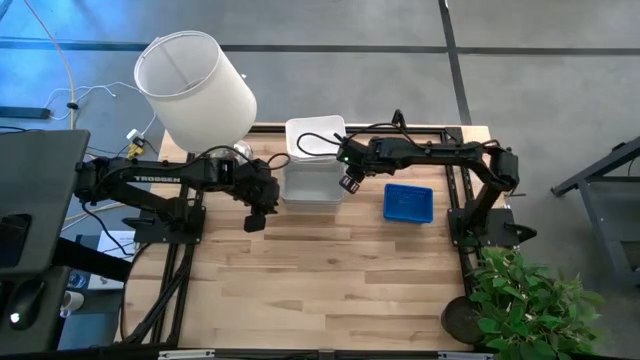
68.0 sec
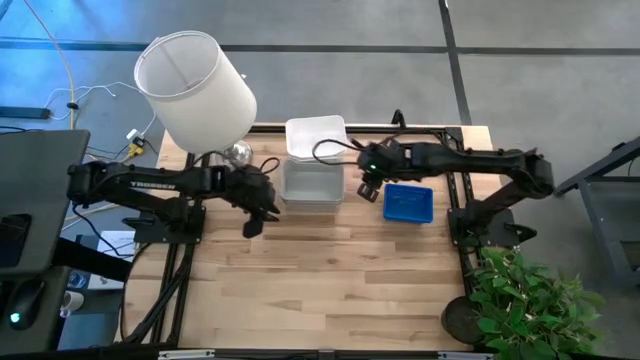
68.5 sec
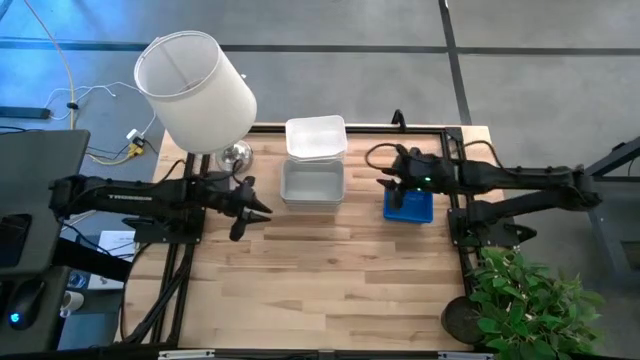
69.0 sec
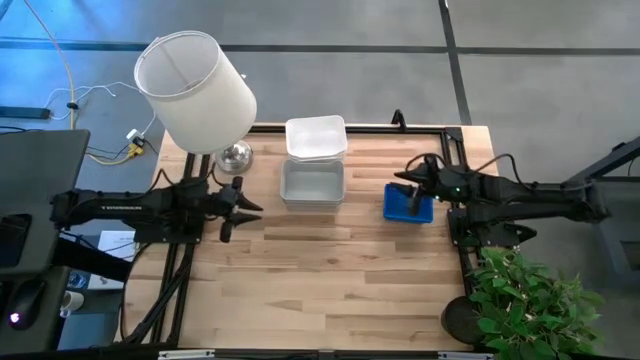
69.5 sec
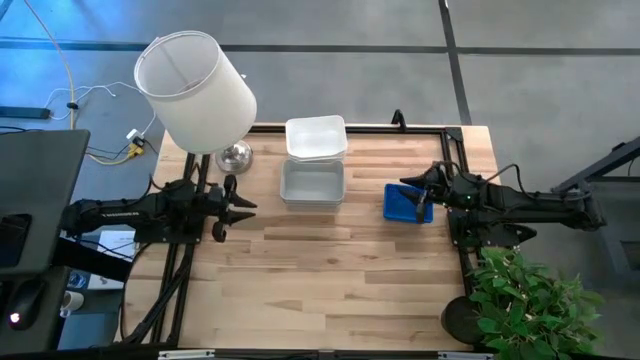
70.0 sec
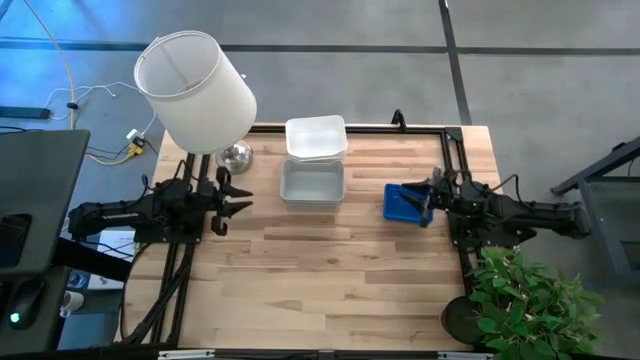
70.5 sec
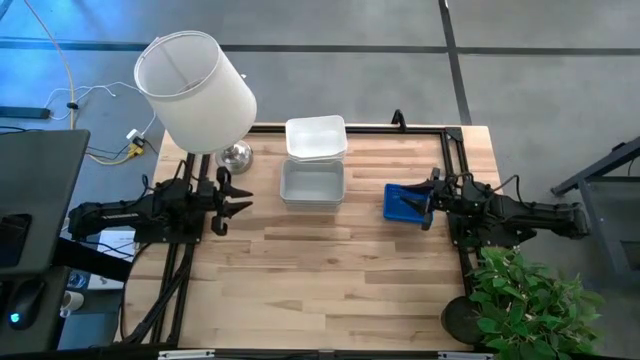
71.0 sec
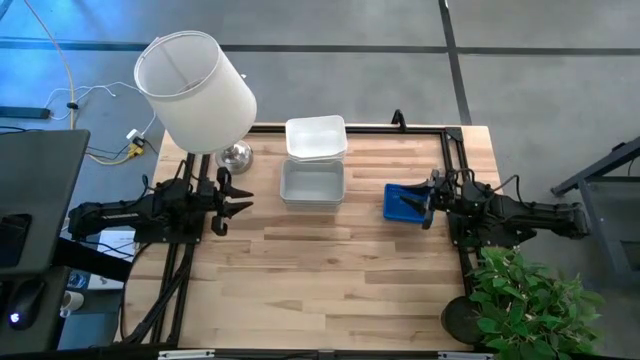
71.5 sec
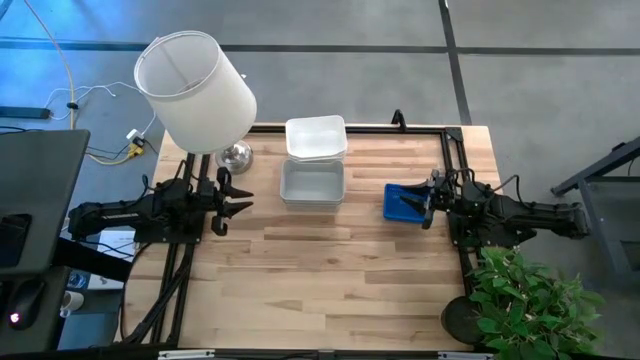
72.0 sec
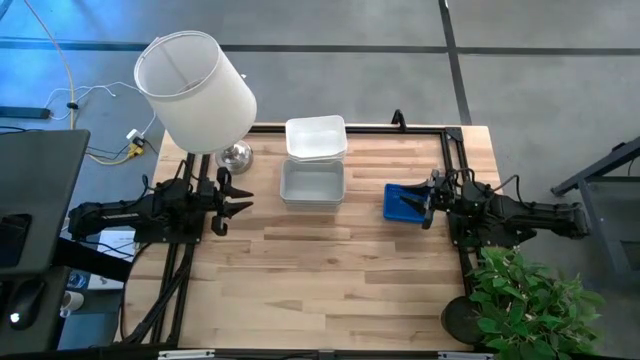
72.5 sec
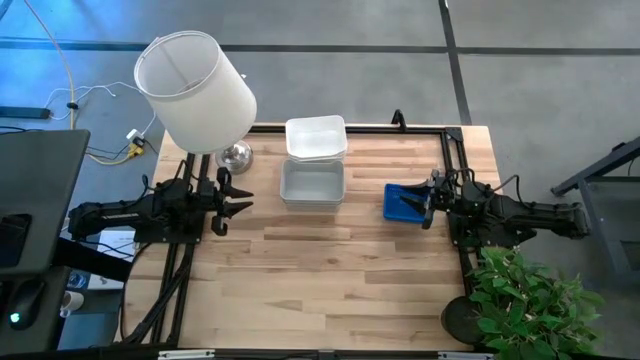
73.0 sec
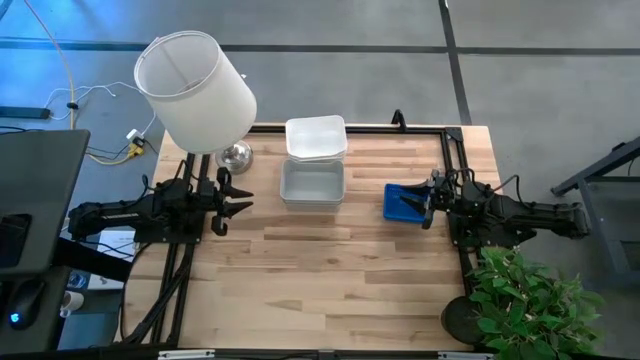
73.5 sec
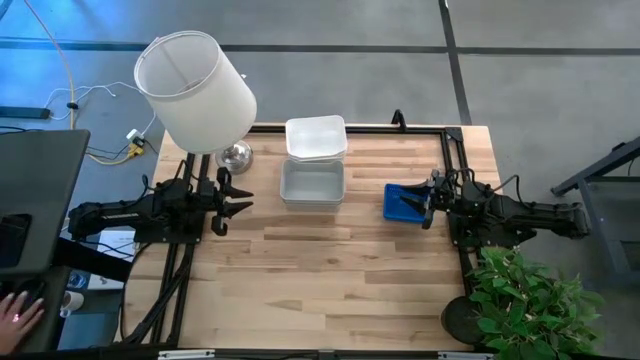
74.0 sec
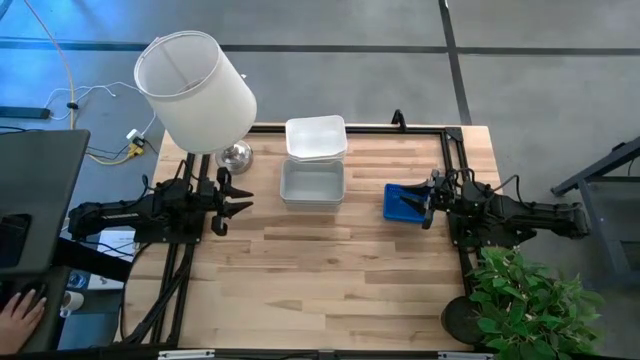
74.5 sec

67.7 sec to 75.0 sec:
Return to Home Position

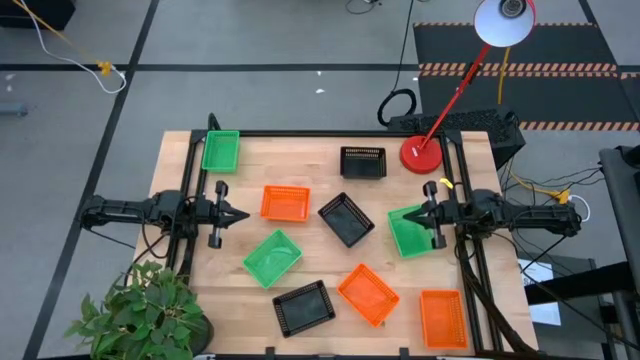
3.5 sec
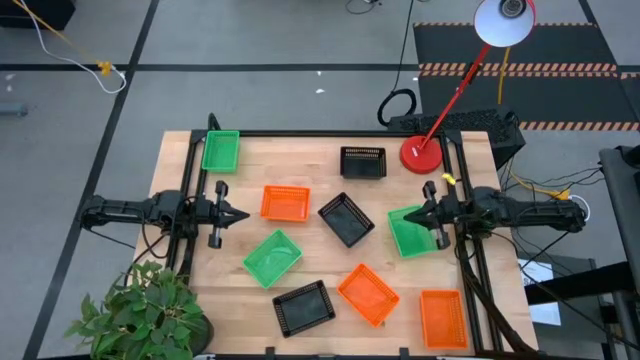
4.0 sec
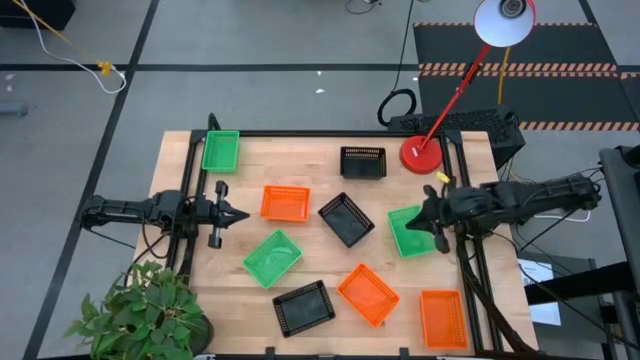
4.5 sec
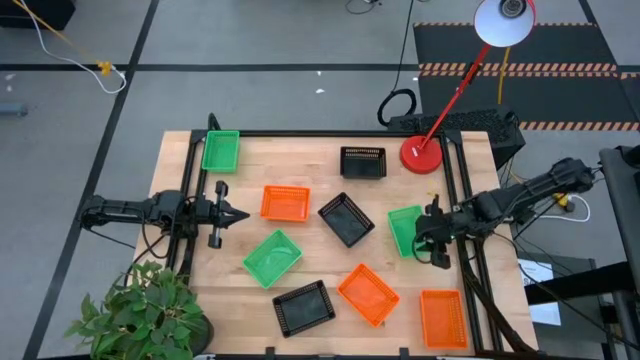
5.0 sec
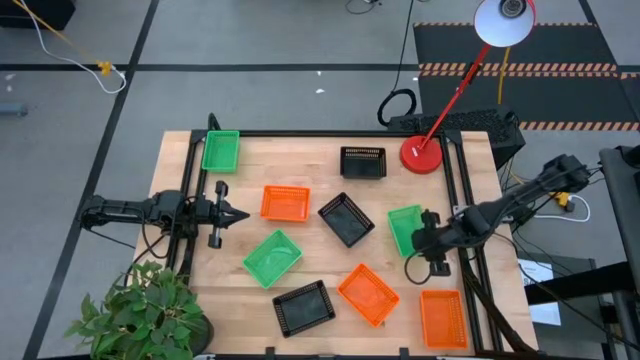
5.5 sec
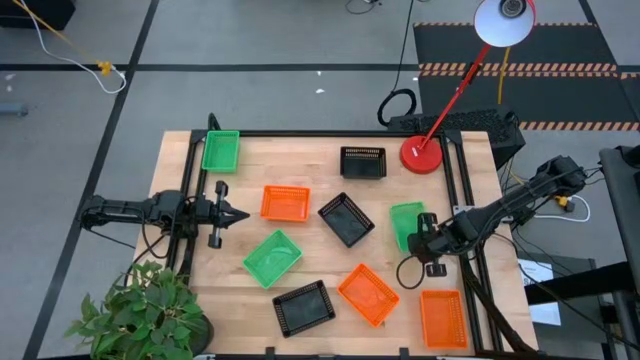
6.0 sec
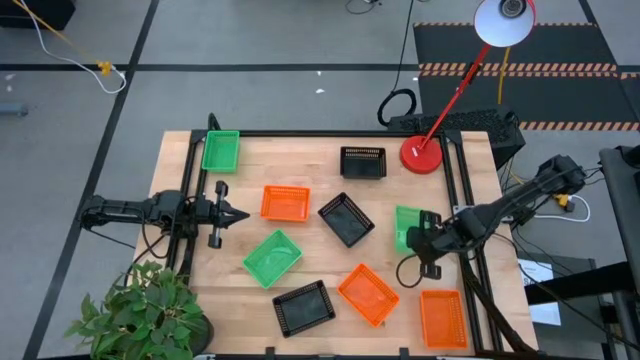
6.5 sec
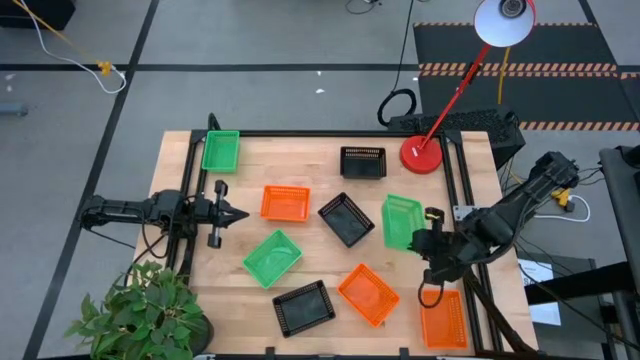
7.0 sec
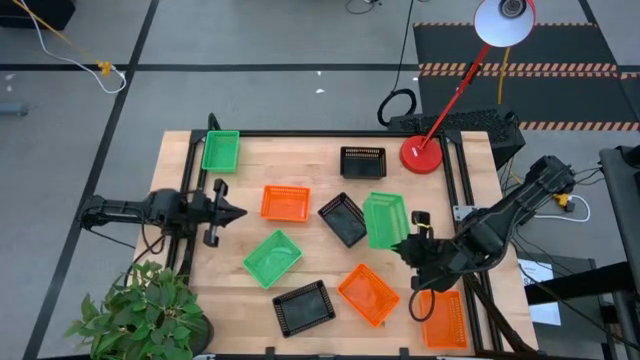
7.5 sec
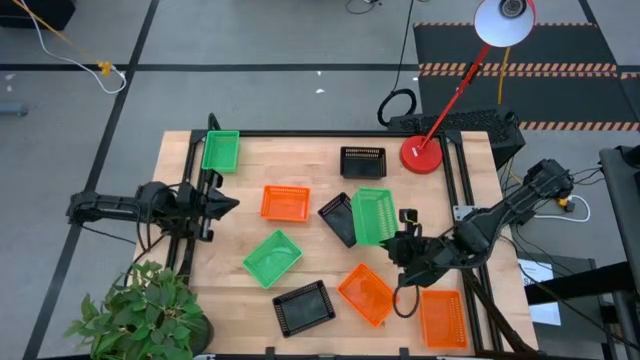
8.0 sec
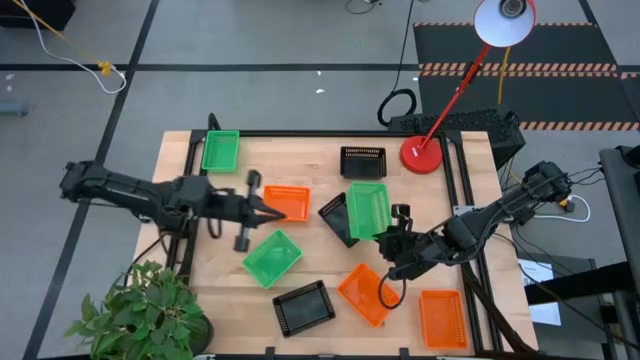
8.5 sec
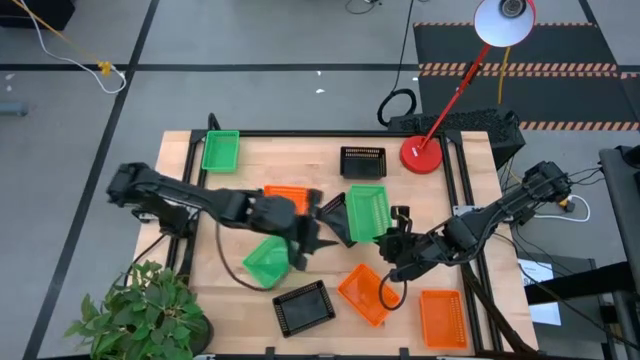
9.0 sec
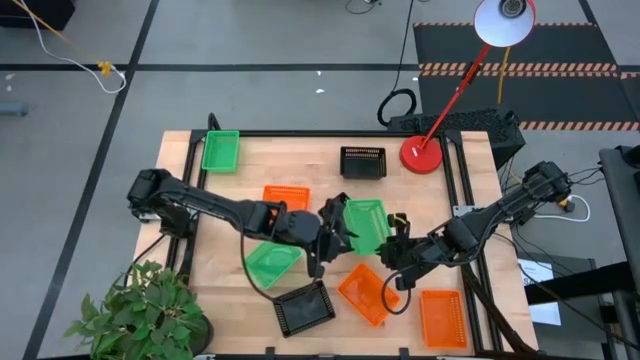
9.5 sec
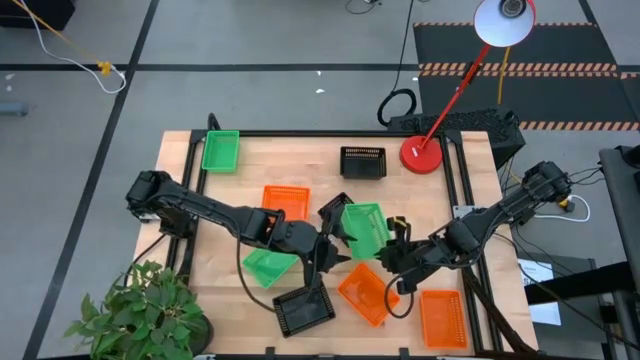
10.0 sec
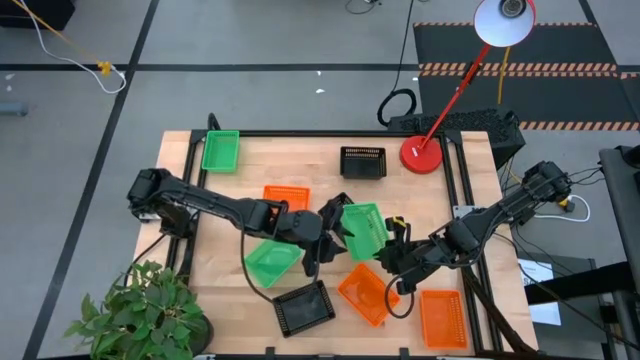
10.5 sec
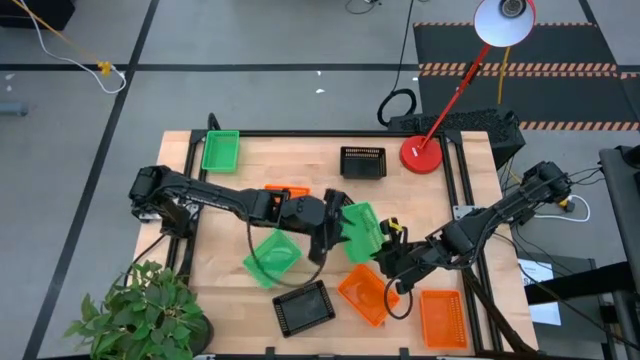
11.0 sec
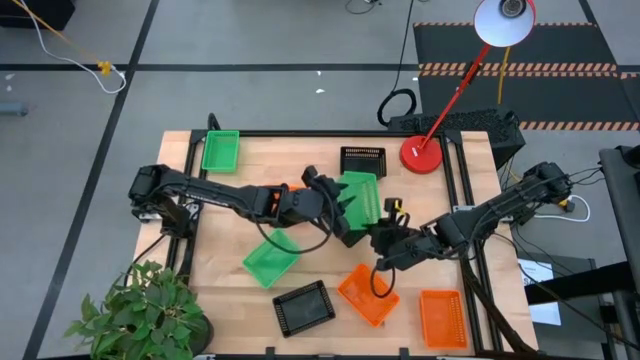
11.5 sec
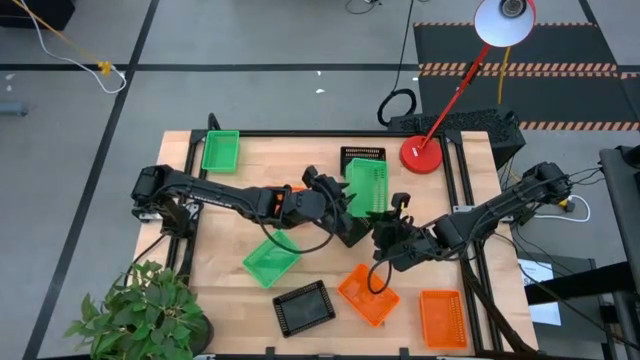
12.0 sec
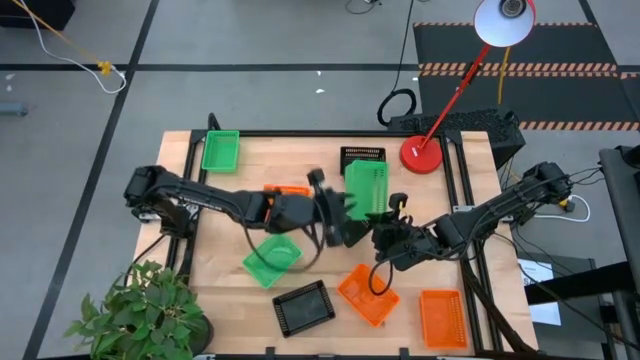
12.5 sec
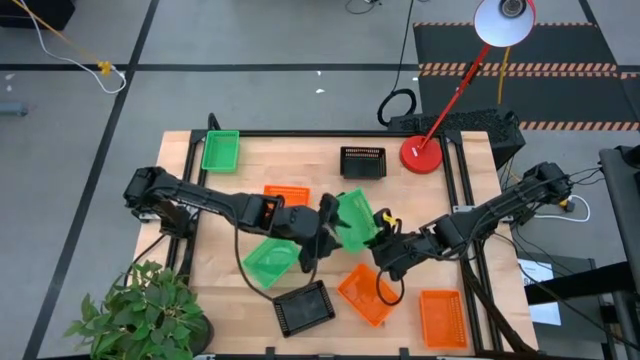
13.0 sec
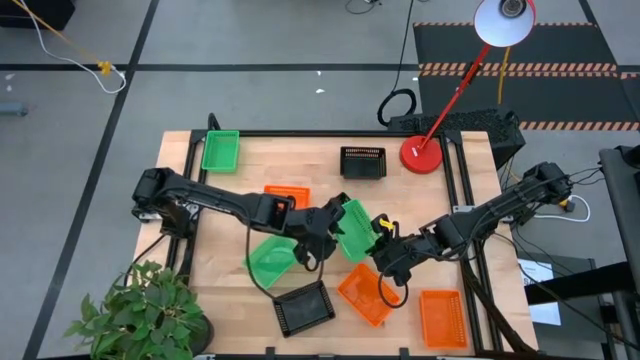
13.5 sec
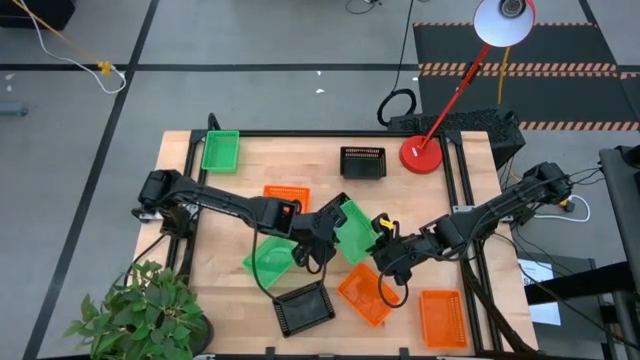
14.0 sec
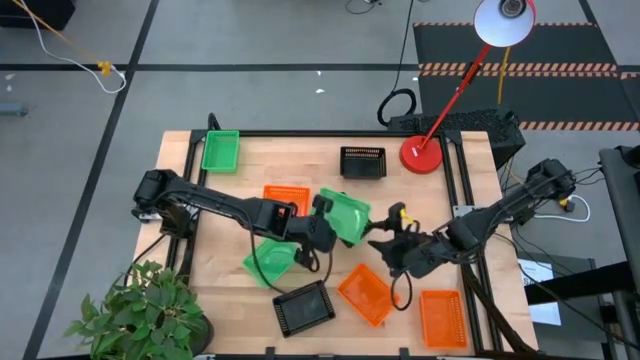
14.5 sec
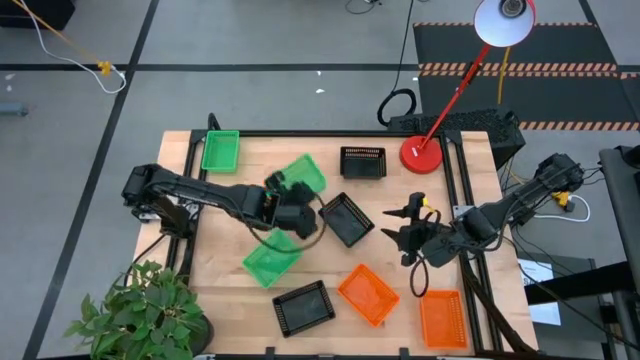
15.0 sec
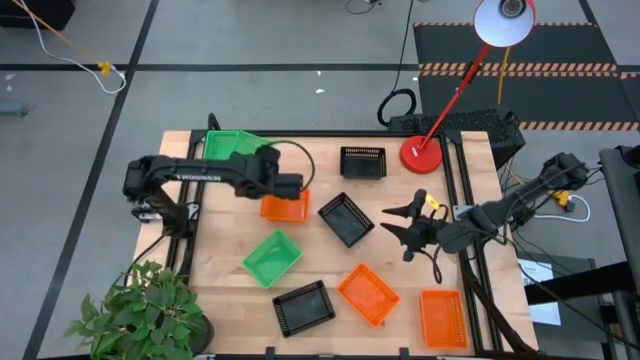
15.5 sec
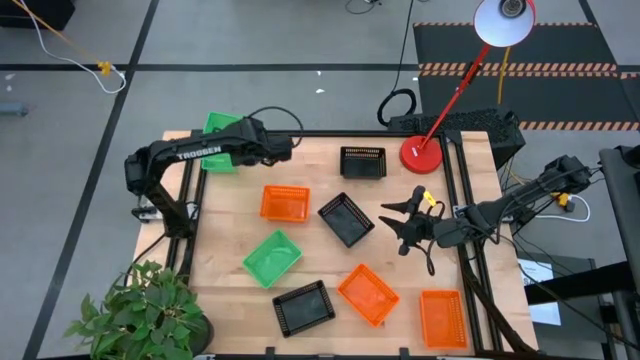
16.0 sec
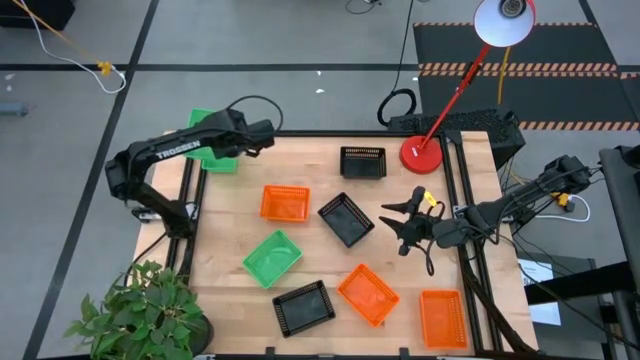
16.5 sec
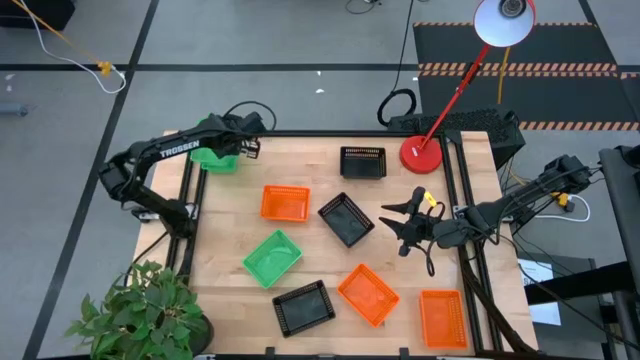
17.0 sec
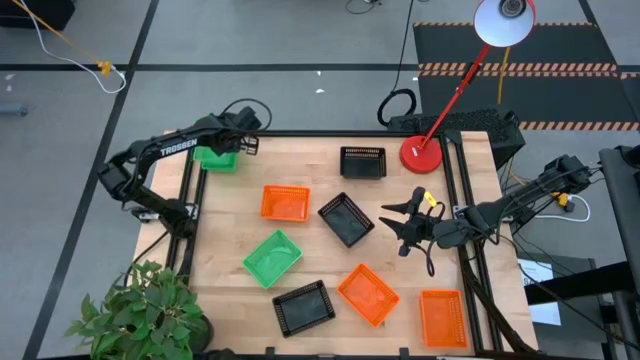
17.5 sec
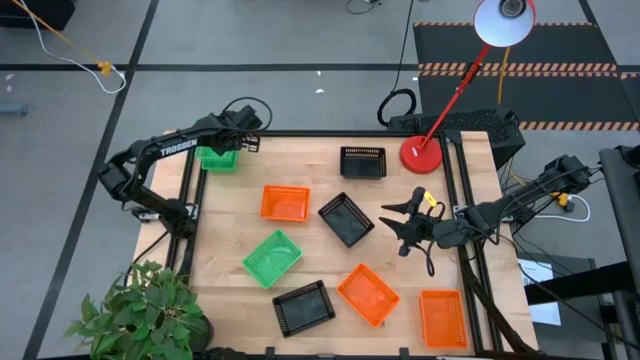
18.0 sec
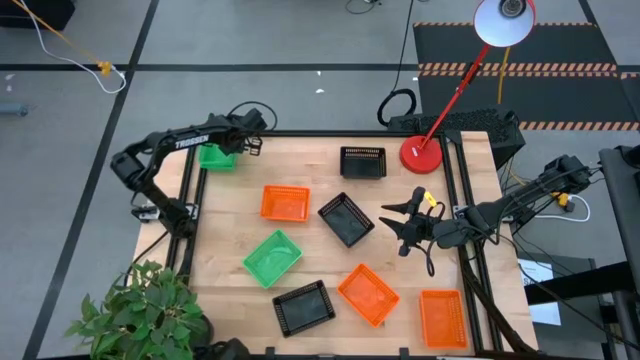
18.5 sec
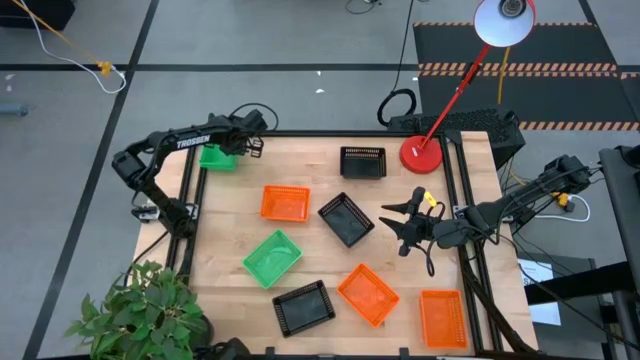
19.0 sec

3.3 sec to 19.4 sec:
Stack the right green bin on top of the top left green bin
